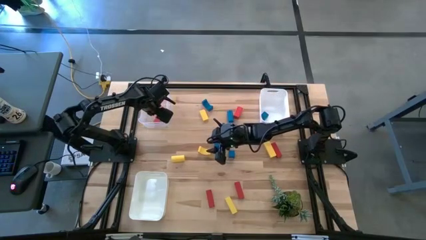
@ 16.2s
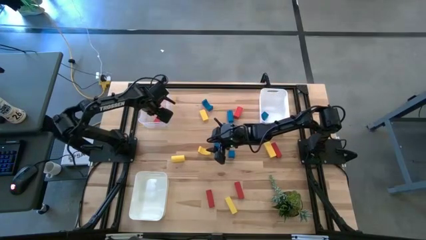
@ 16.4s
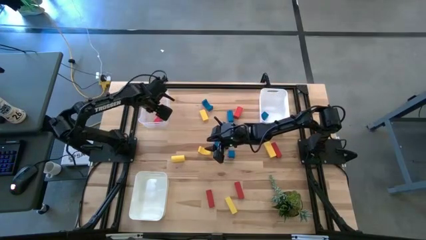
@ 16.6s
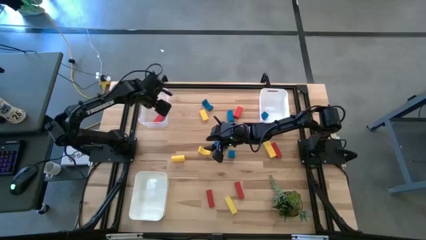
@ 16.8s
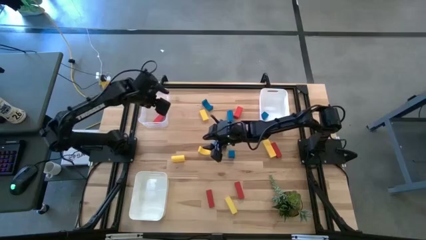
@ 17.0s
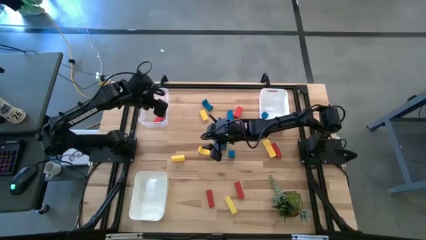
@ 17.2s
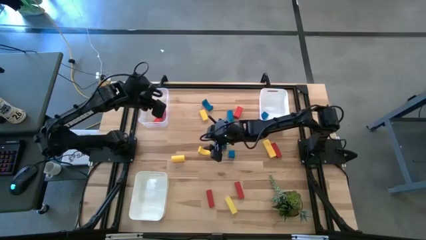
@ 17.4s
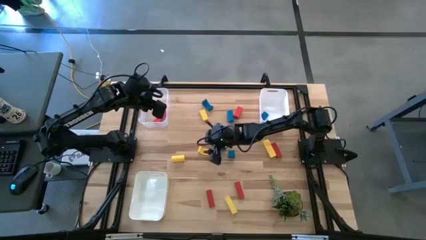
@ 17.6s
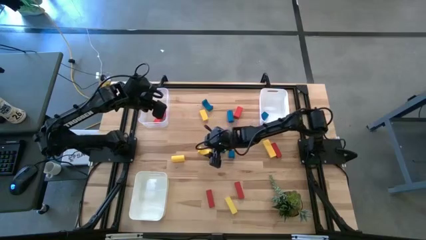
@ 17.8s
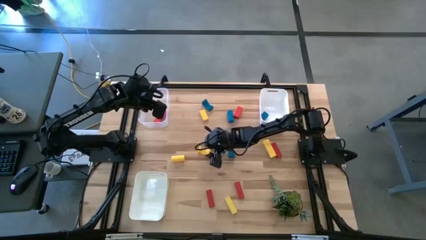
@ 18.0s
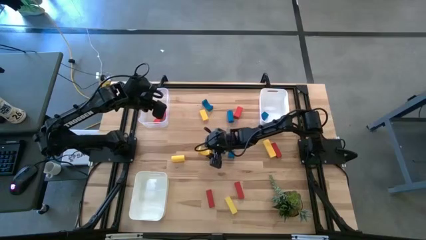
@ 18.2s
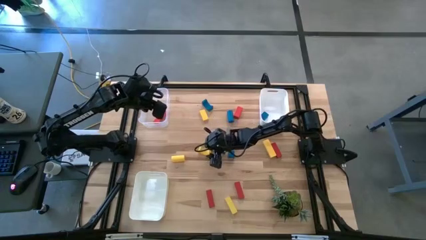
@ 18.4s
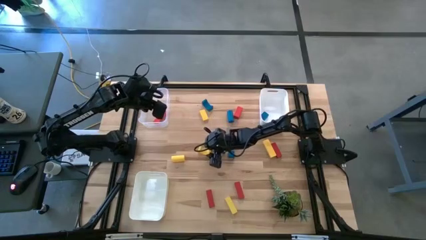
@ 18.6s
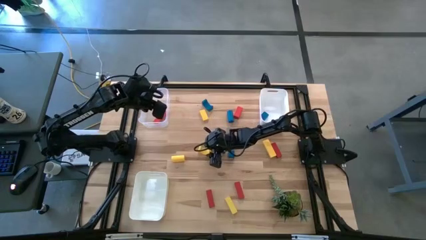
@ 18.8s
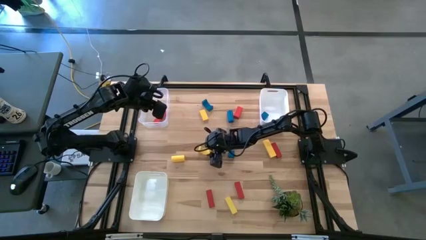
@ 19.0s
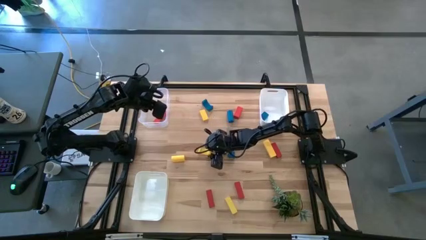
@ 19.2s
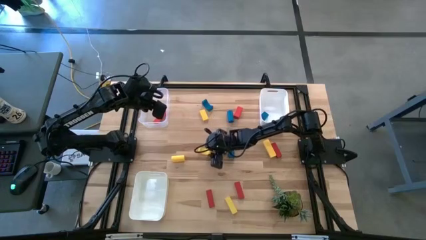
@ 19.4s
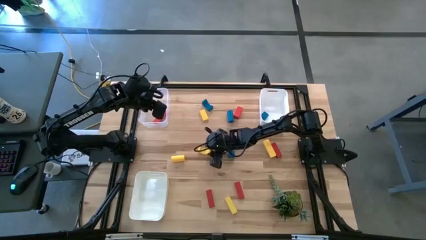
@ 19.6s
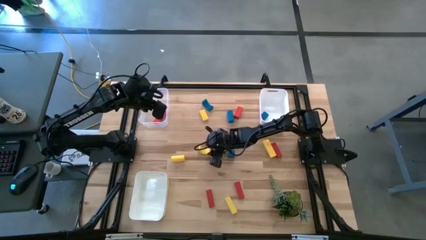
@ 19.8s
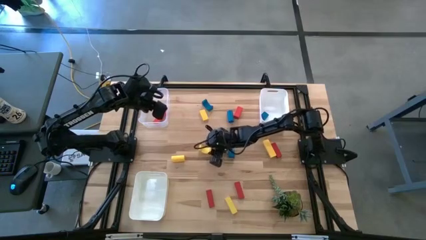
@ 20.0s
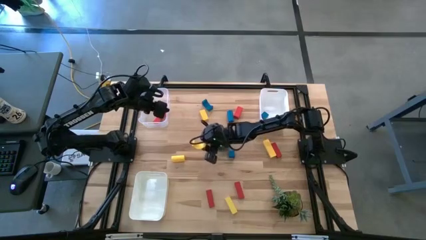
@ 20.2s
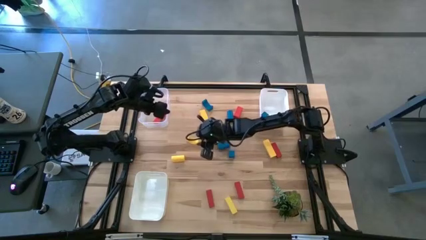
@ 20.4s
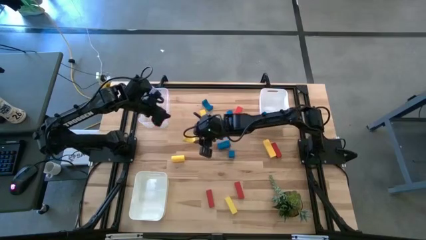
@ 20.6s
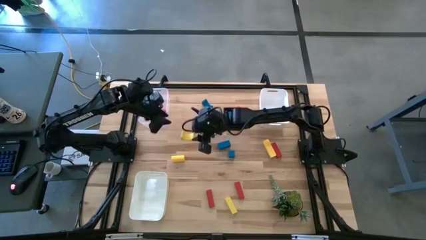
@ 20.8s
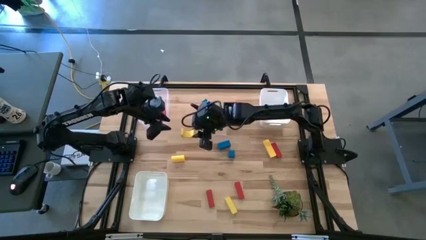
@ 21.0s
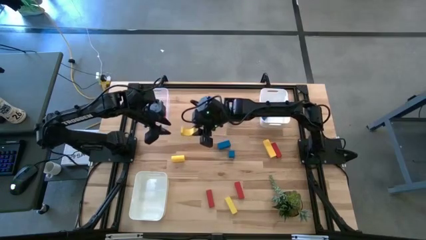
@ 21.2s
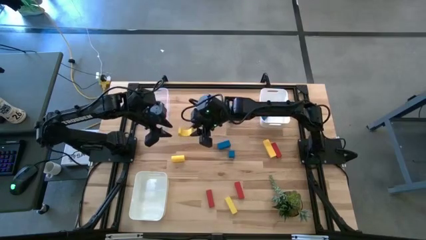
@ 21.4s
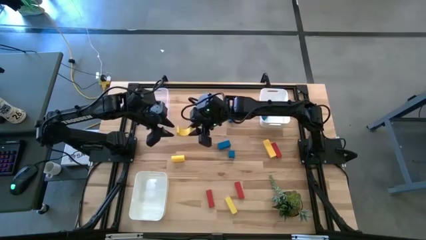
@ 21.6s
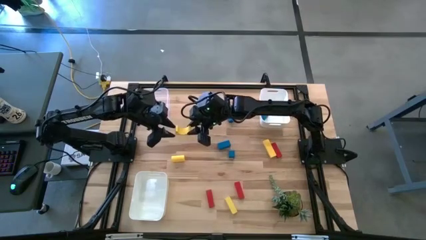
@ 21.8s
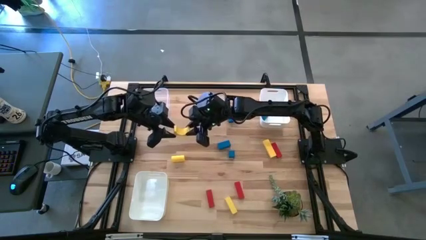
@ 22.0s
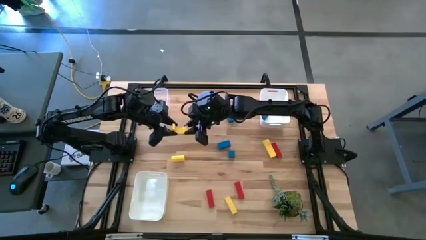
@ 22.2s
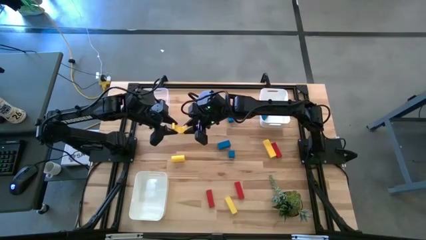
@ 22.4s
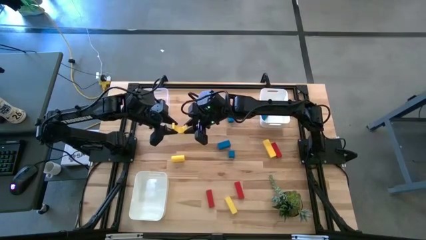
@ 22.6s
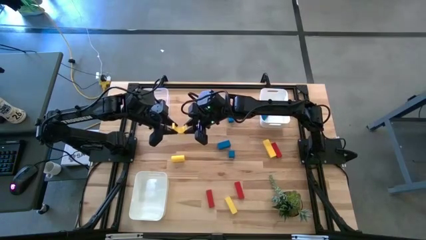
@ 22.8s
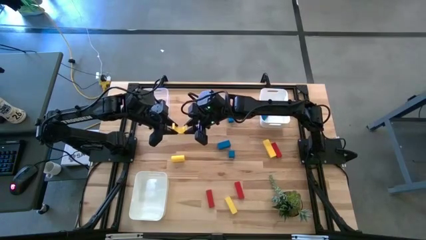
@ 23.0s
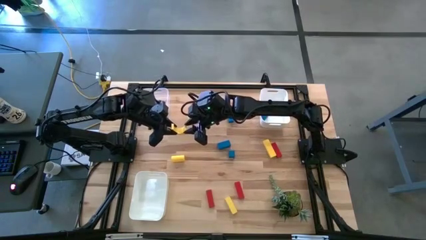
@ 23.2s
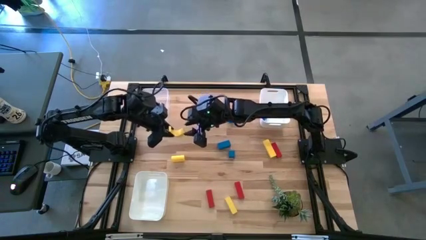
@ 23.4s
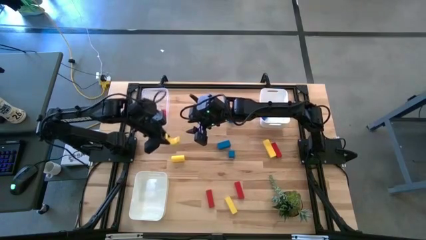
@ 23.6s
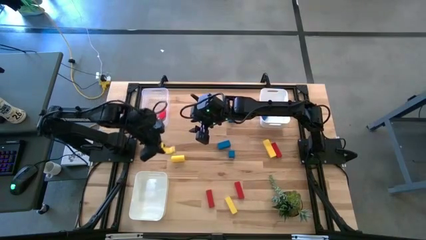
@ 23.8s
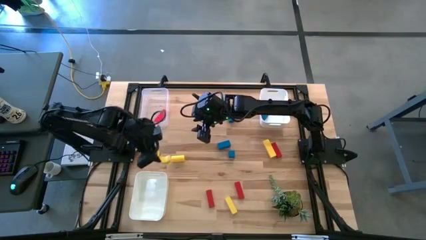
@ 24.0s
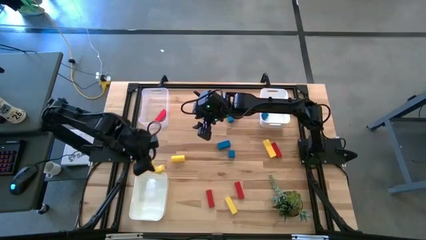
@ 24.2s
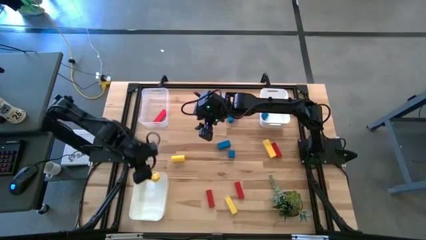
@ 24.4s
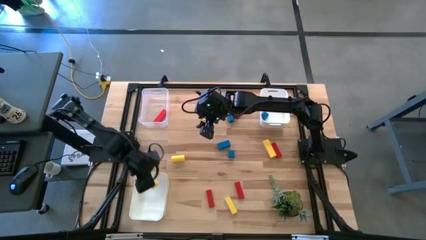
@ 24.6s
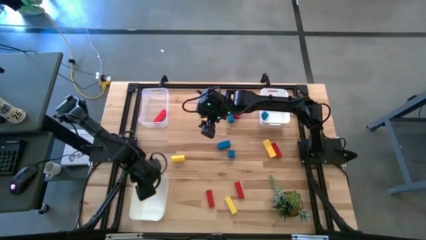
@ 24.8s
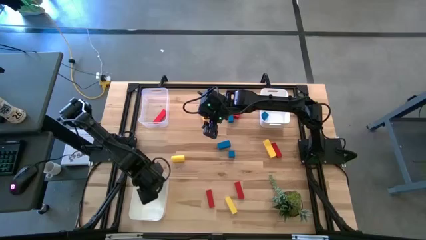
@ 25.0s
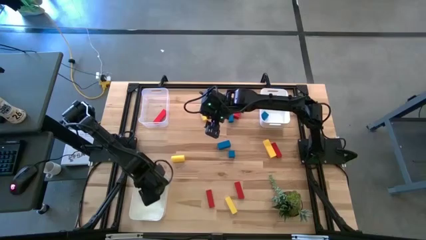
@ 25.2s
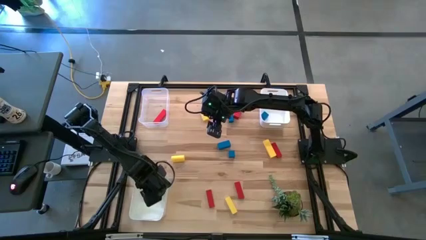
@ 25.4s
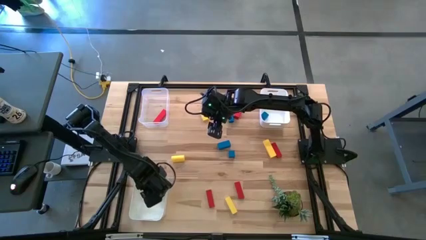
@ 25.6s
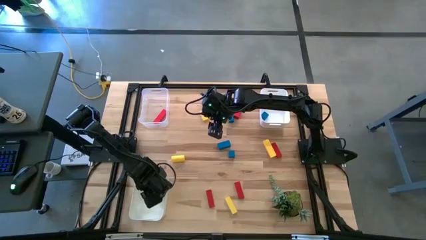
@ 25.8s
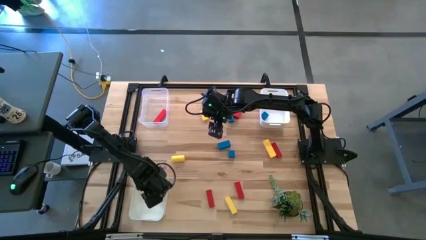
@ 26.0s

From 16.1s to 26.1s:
Task: Sort & place blocks by color
Put the yellow block into the bottom white bin

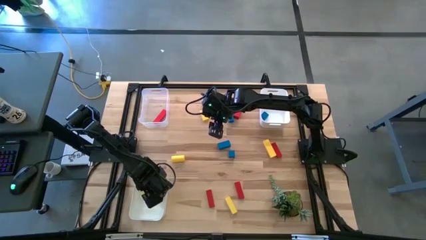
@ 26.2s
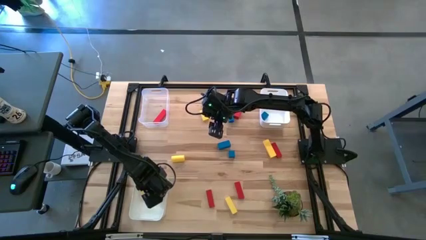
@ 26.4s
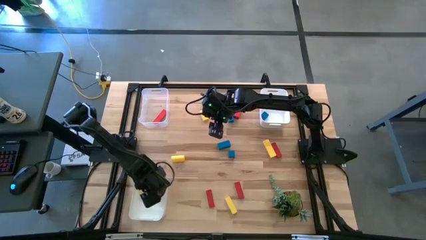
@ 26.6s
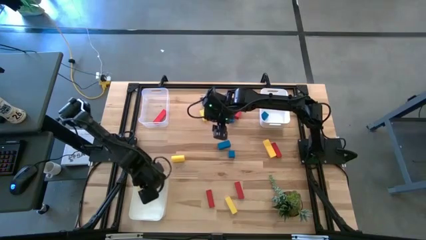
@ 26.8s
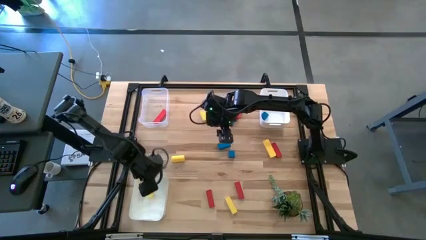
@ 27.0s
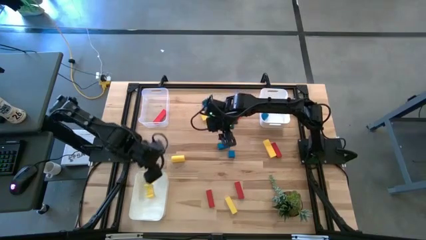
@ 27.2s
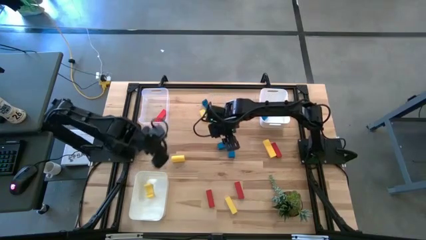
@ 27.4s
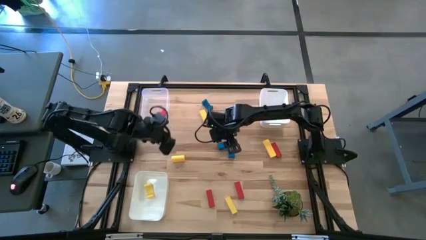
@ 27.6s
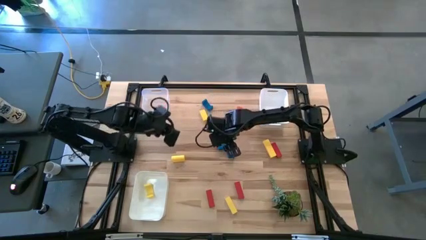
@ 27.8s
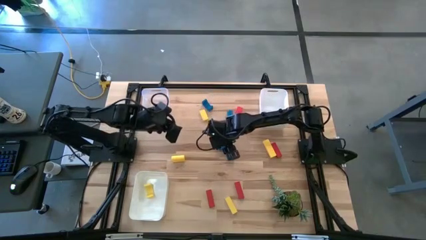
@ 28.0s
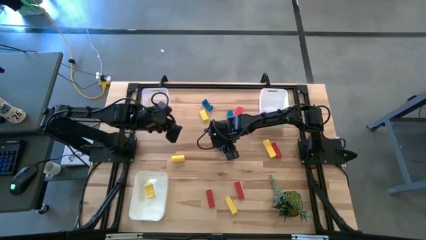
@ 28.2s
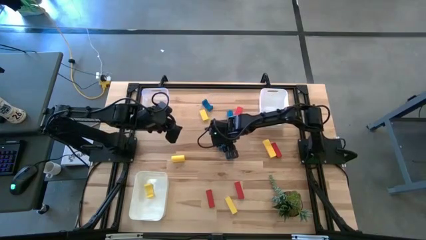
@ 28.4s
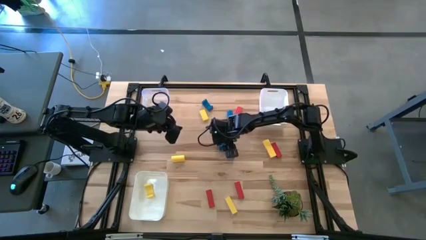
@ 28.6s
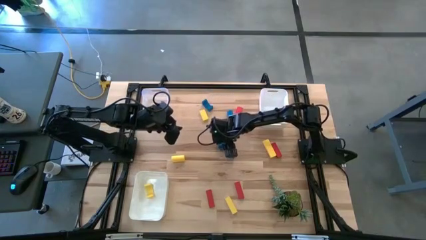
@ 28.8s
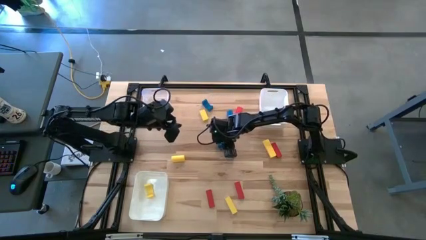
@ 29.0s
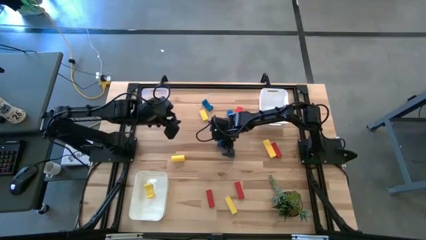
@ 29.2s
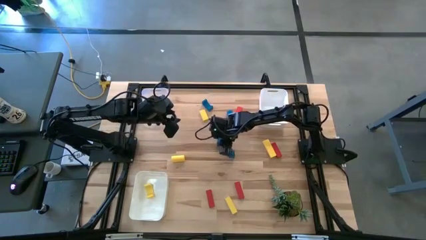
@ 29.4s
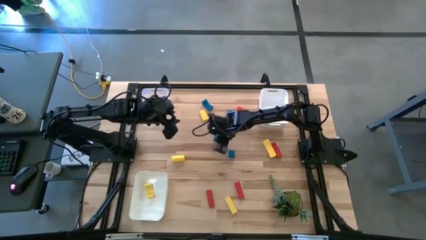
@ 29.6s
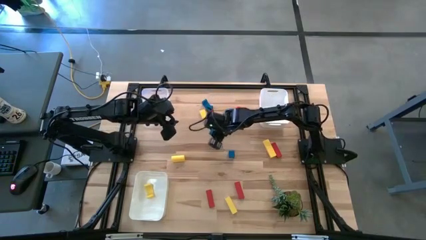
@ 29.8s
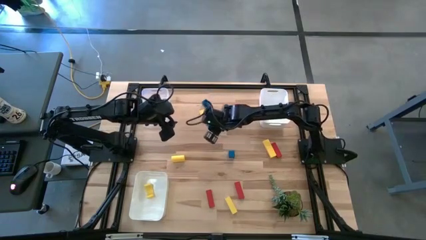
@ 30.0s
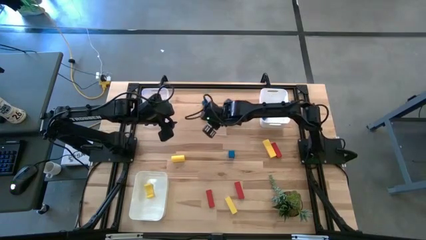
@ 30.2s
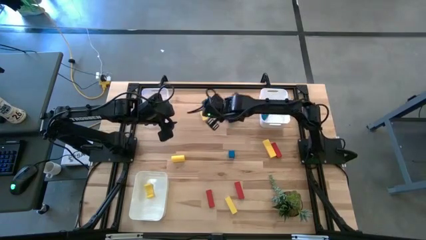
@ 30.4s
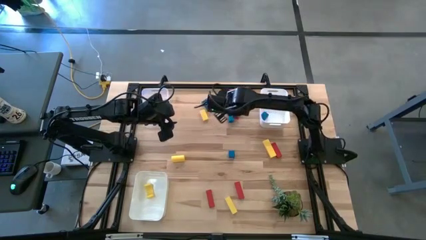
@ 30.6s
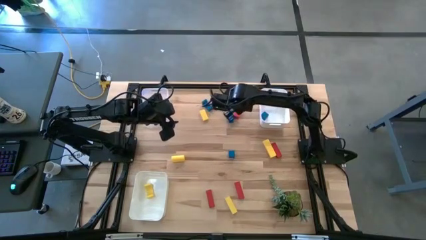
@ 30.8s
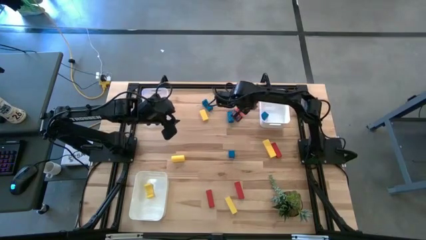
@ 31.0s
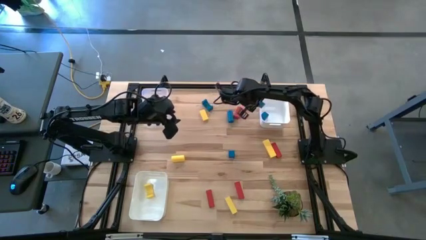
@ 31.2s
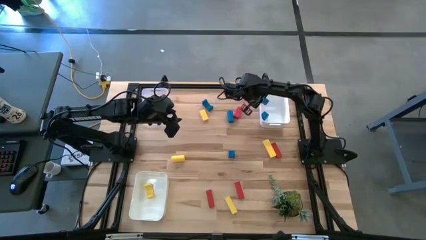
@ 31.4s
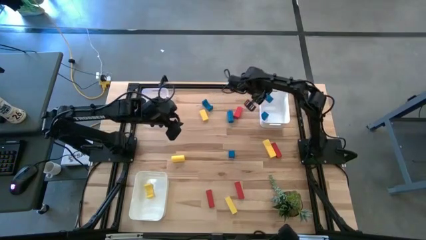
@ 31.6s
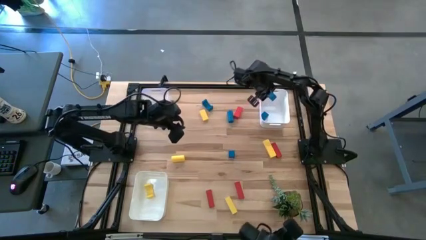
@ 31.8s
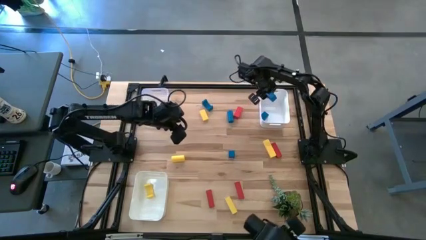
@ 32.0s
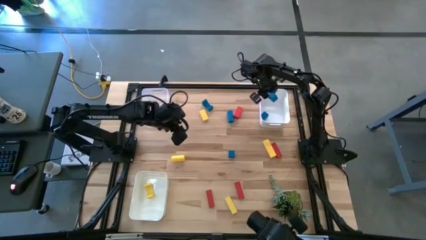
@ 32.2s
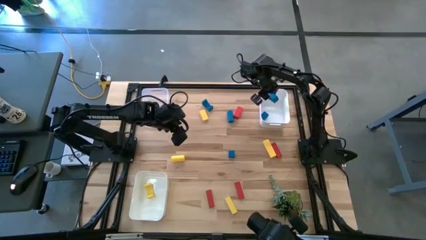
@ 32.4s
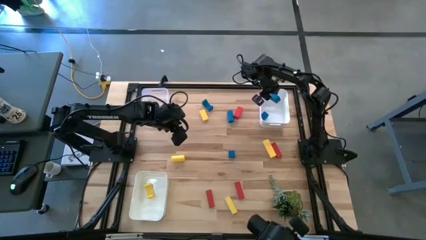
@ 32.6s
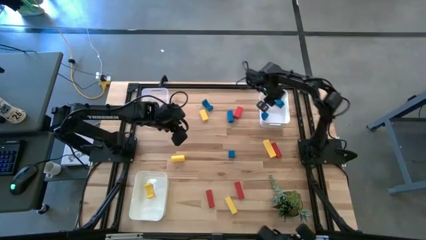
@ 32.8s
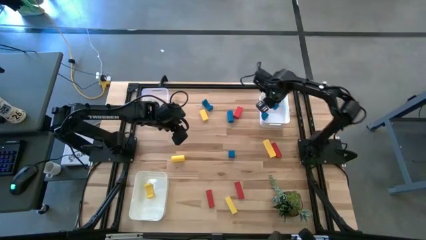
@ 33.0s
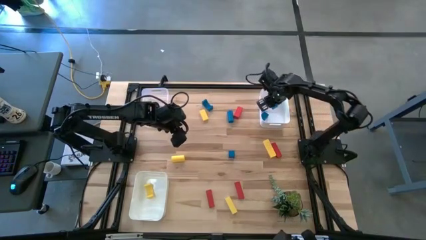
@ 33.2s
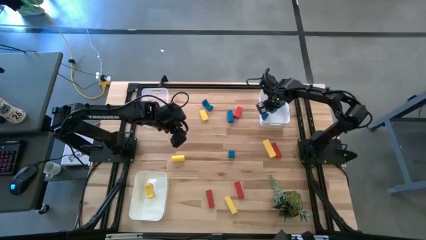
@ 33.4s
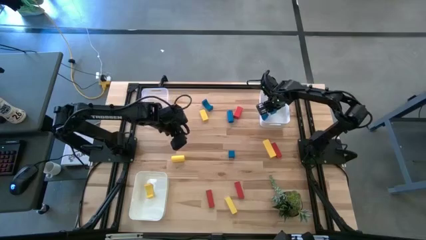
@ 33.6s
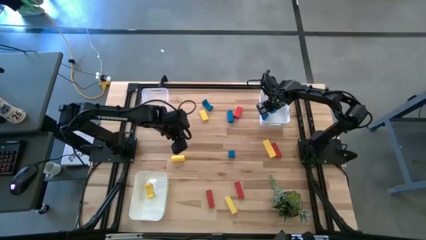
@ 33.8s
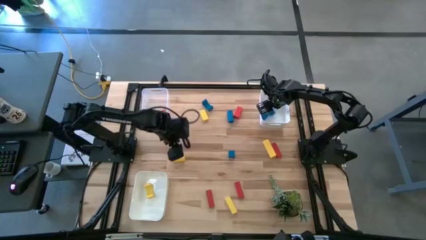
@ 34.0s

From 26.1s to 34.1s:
Put the blue block into the top white bin
